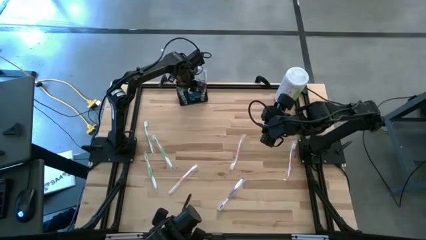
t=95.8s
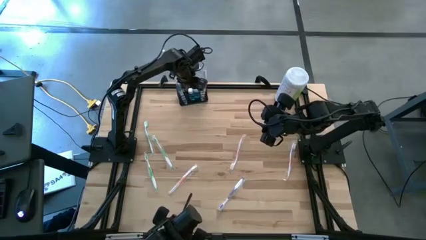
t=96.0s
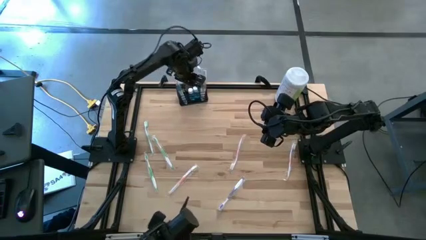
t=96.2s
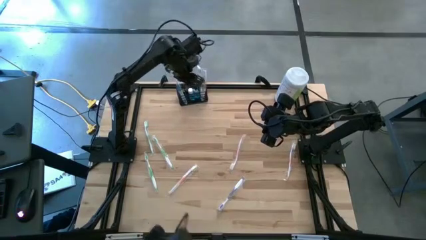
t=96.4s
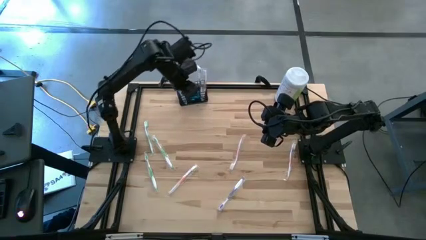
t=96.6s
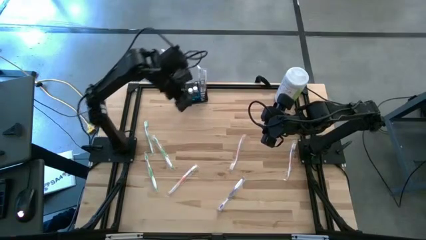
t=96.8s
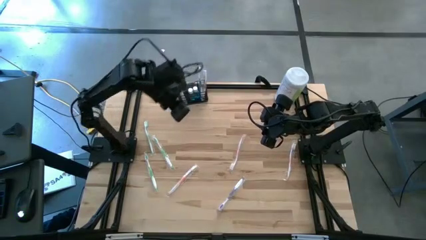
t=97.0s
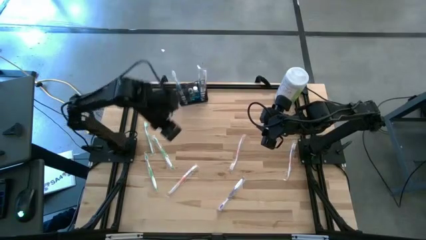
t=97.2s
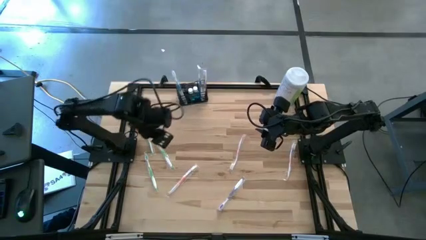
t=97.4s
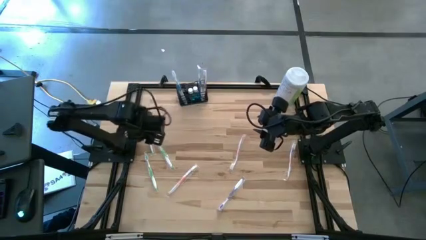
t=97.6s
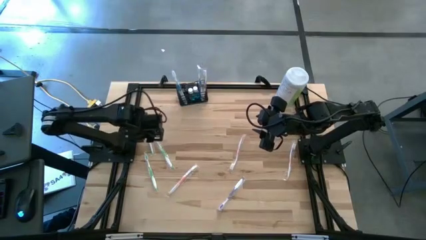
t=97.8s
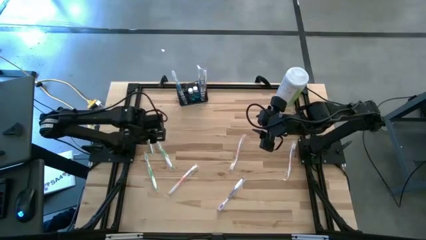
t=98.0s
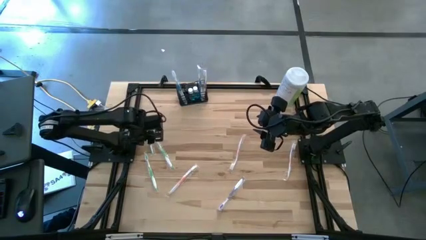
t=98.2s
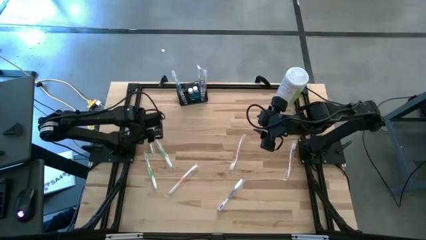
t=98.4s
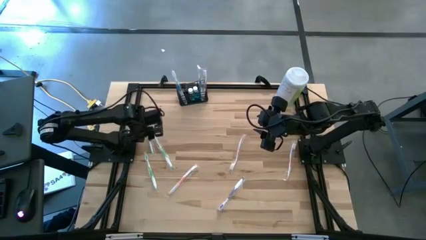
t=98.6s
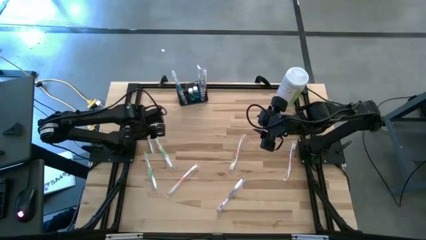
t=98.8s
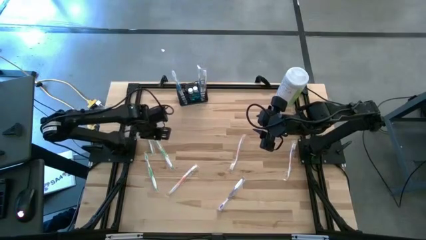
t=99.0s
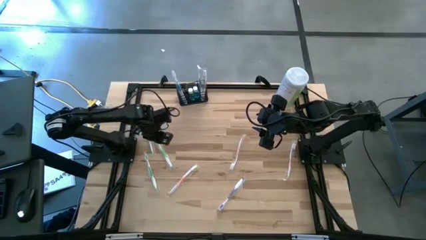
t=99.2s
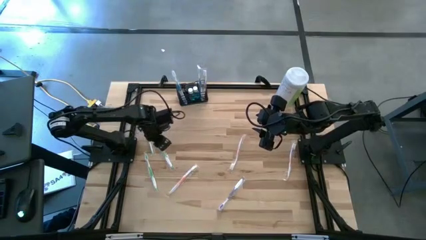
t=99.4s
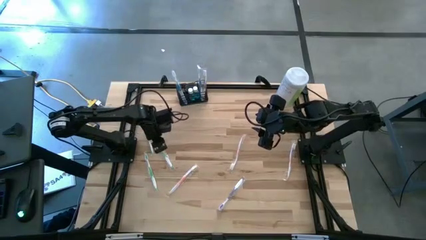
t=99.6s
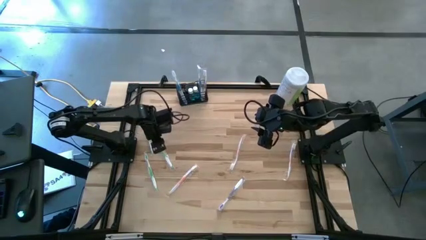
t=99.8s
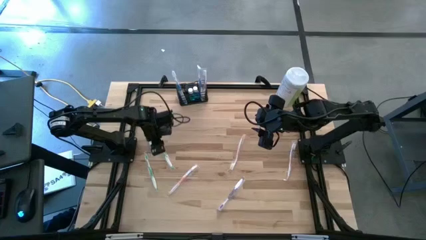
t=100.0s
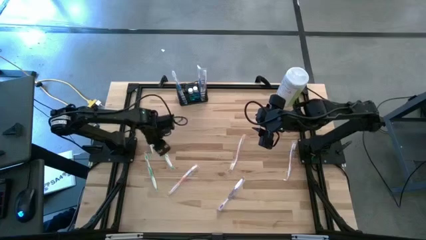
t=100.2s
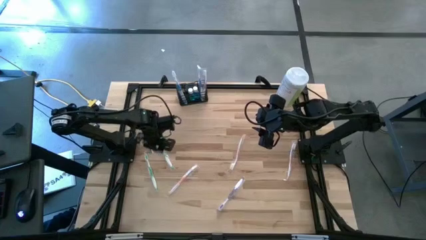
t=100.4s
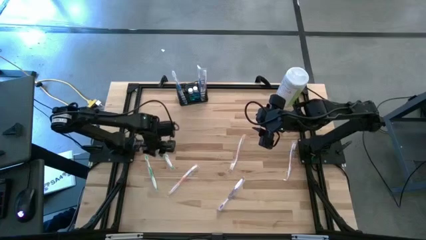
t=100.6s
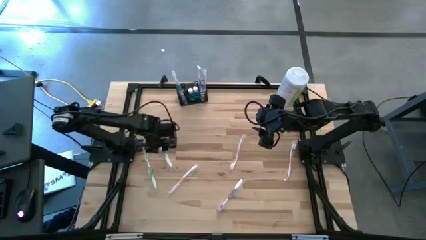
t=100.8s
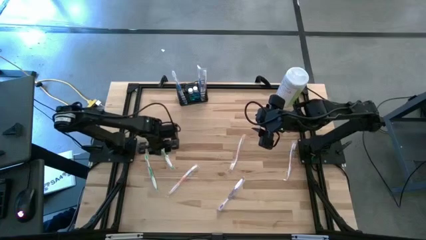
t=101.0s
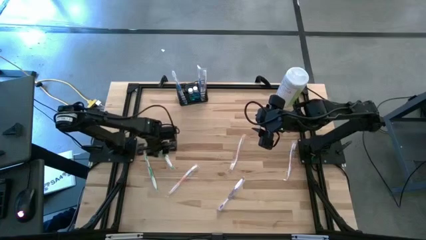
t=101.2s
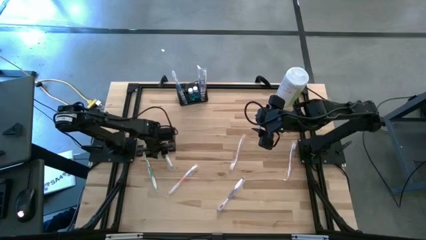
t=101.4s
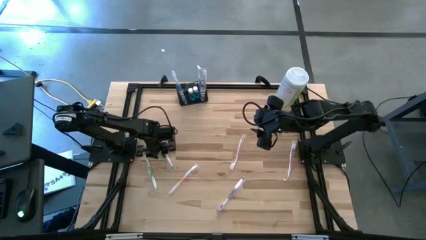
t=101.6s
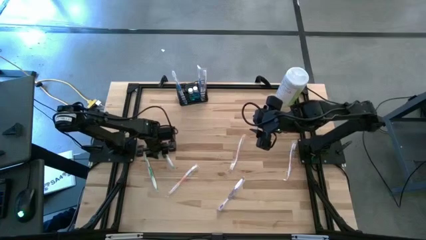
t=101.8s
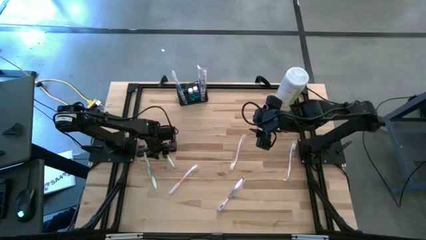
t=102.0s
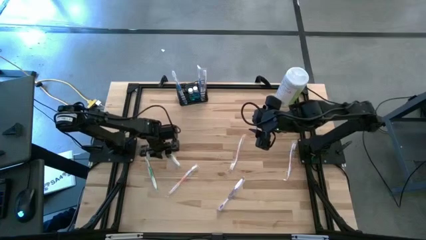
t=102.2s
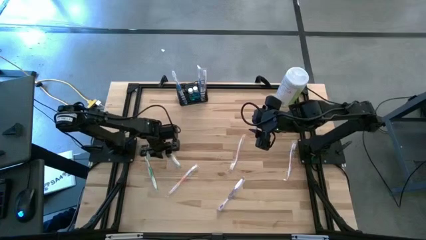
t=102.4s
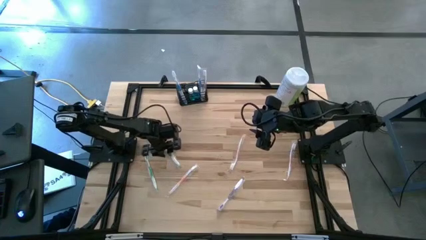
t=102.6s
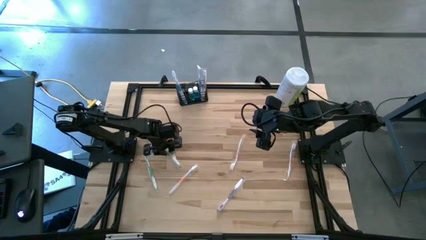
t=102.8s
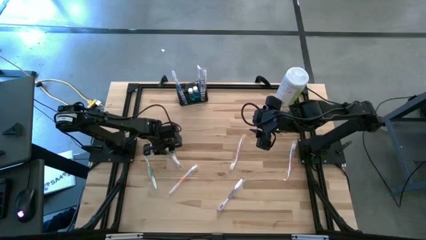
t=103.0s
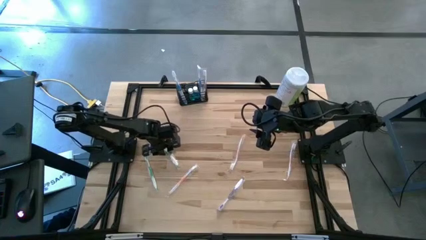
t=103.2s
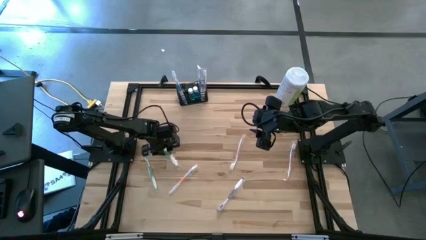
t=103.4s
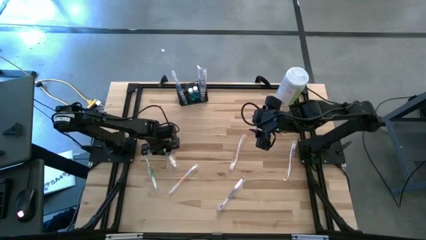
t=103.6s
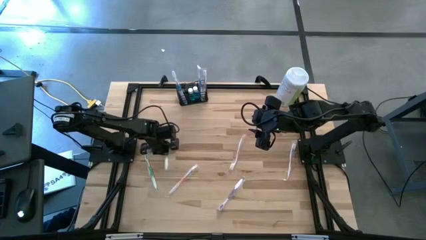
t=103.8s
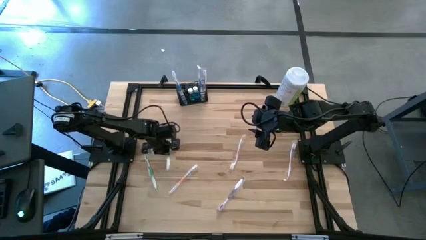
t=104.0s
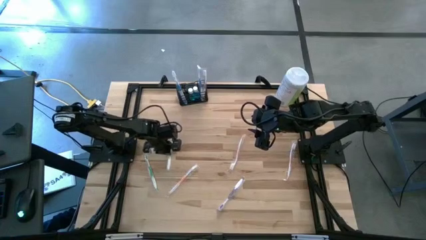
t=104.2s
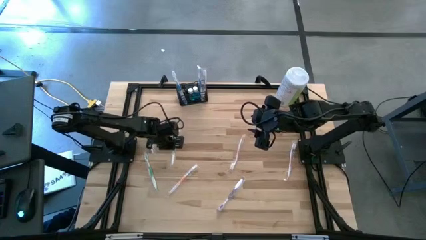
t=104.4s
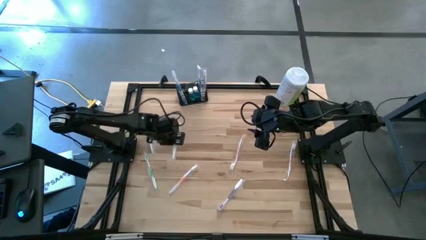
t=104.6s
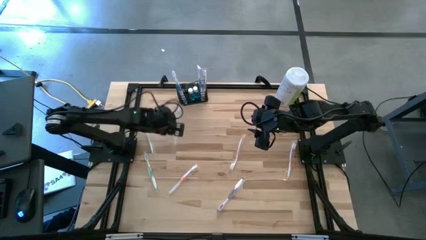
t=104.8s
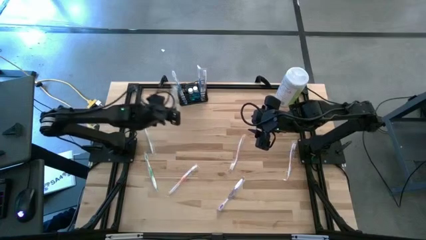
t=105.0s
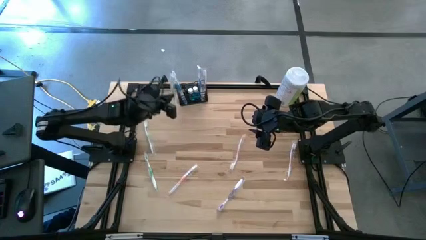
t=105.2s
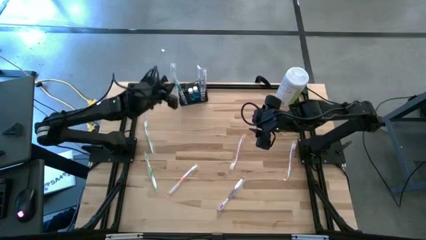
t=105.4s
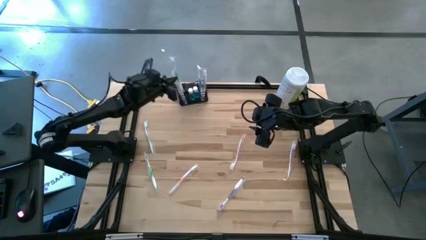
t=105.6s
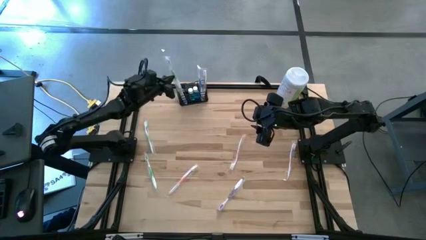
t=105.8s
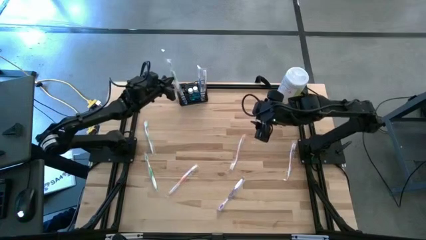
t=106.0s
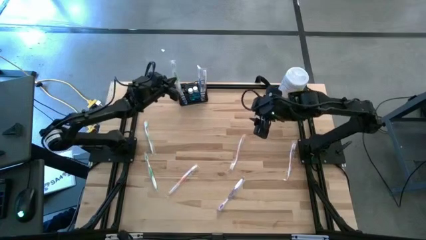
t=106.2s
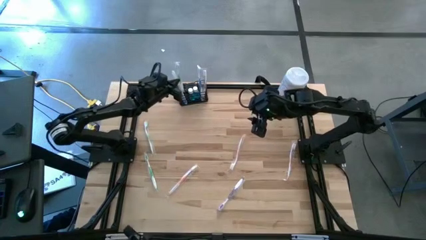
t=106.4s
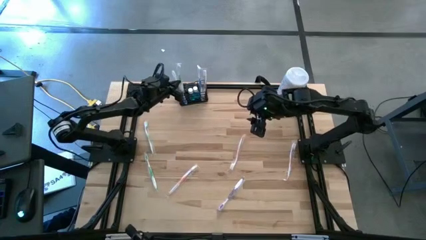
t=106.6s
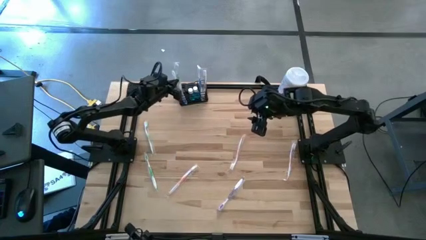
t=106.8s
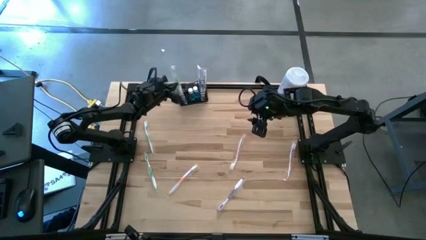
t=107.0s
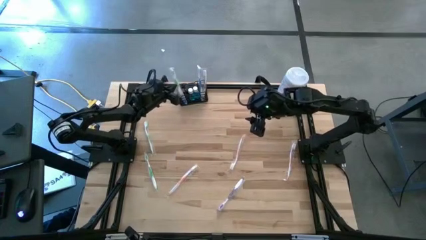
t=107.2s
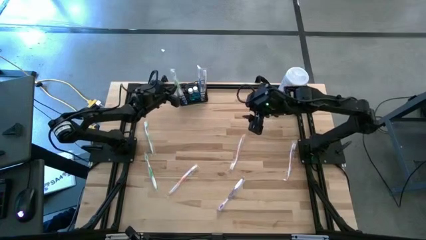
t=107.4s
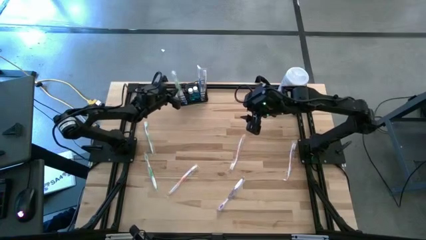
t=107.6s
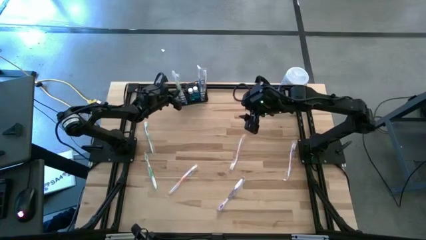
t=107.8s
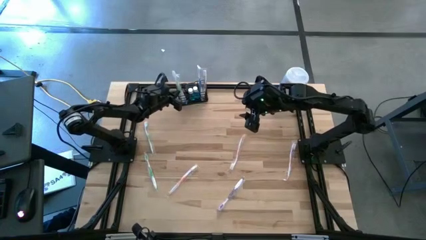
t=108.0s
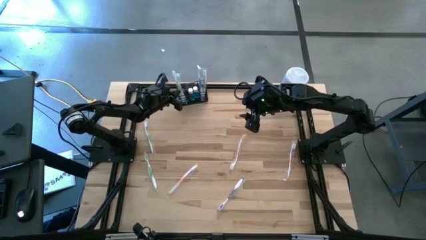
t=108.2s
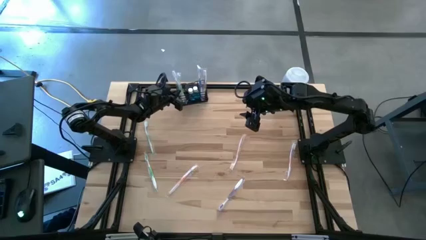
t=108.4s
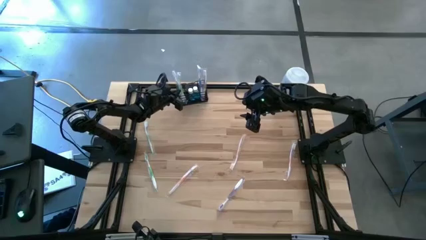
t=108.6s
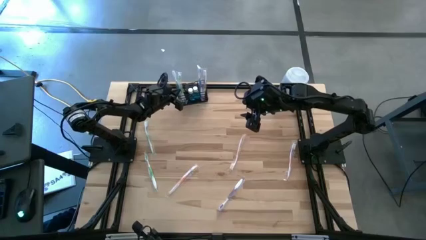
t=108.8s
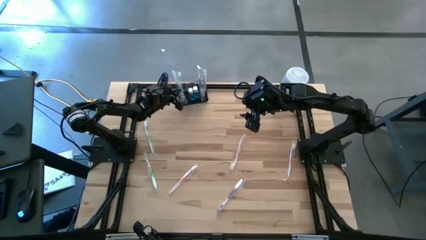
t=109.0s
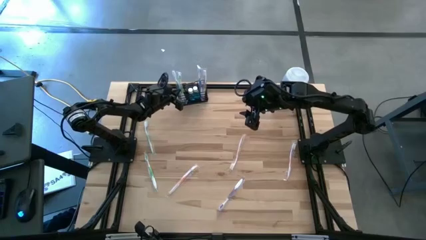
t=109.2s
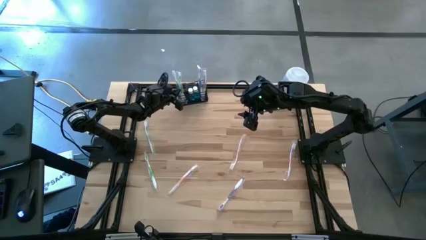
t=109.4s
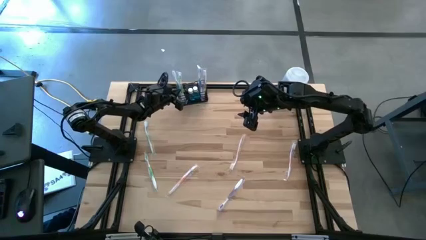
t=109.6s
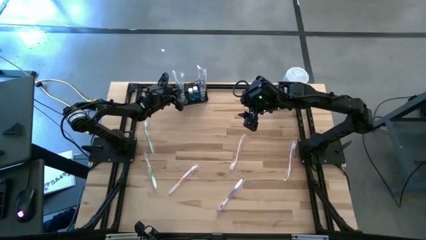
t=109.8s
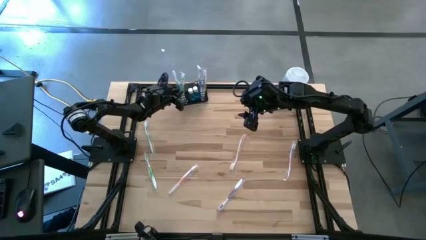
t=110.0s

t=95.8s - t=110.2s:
Task: Pick & Place toothbrushing station
Put the right green toothbrush into the black wire organizer

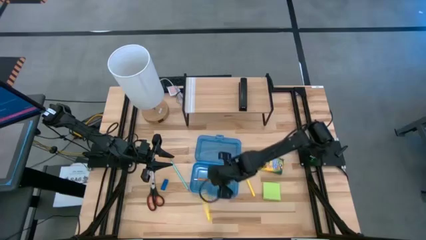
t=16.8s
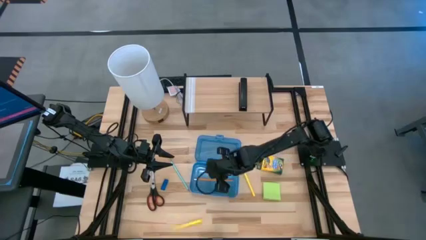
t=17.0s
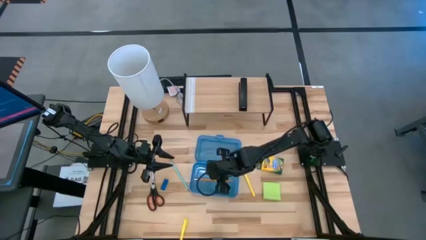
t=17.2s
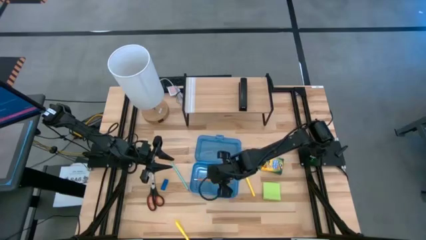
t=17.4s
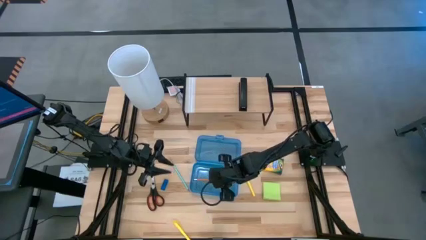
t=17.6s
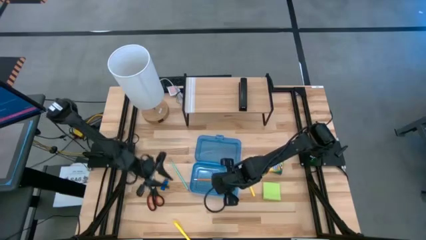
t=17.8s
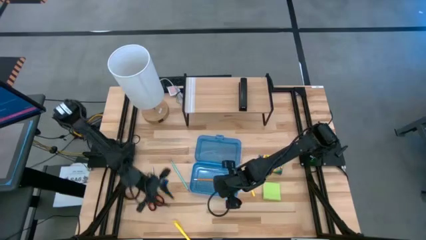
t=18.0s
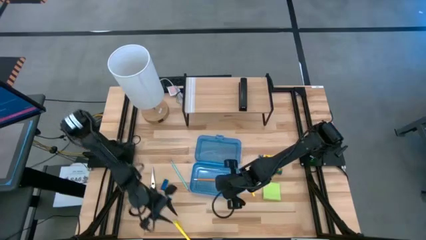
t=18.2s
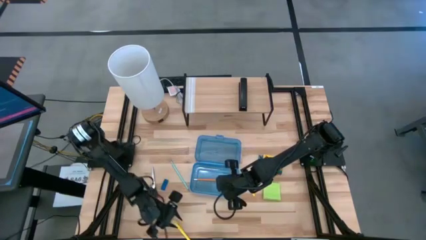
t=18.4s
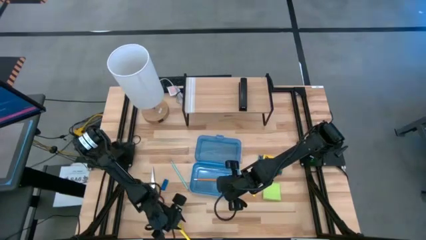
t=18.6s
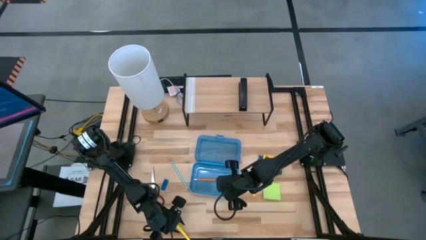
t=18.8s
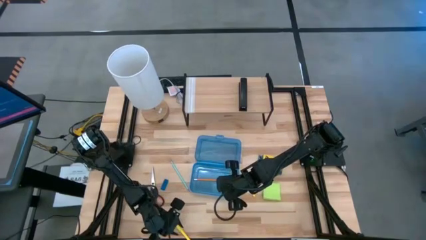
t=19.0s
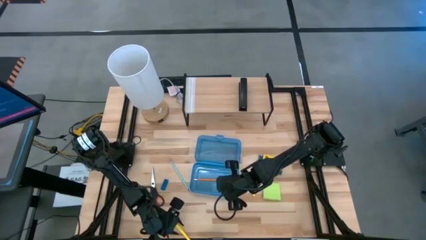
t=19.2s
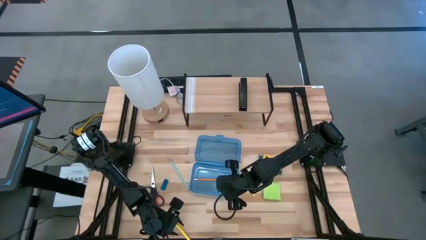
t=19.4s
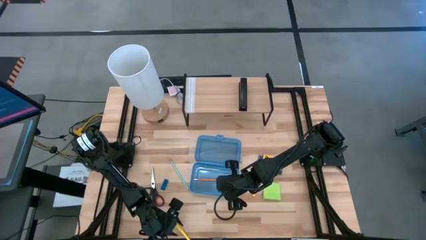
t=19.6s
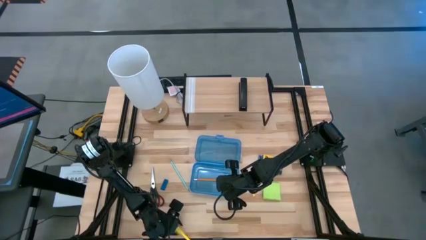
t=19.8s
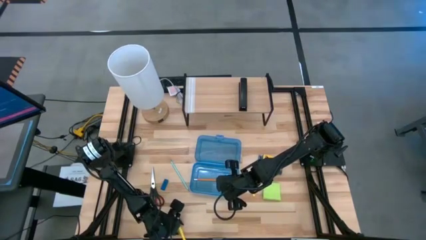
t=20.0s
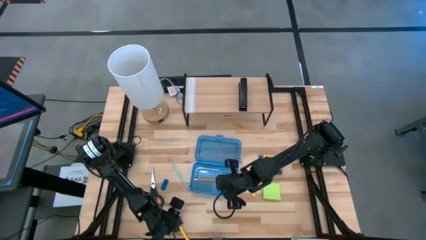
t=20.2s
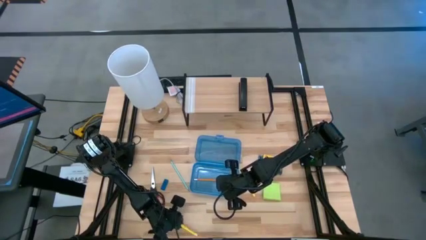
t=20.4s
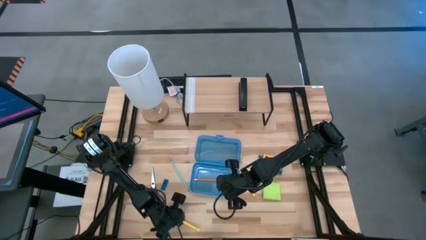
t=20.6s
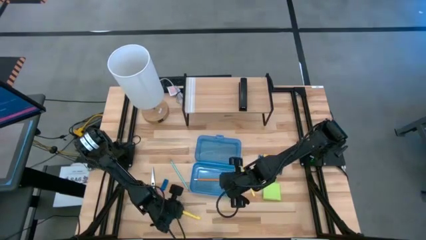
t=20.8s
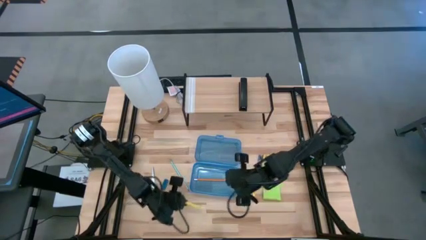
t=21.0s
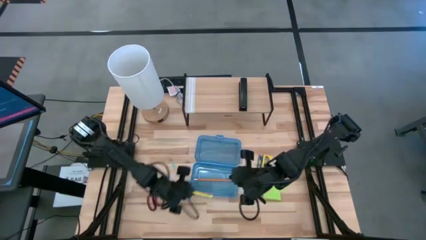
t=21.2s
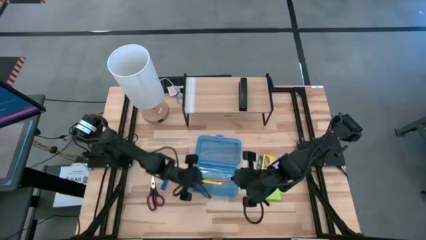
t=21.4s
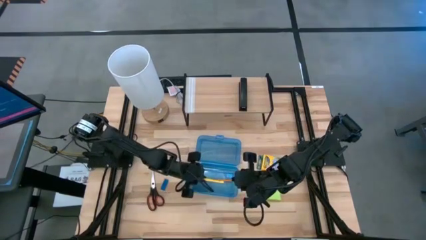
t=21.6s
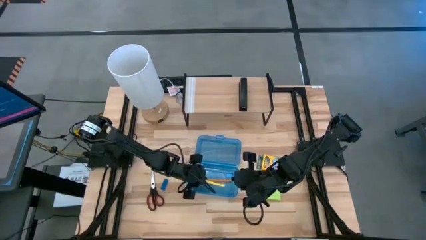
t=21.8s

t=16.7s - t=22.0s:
Task: Pack school essentials
Put the bottom yellow pen into the blue supply box
